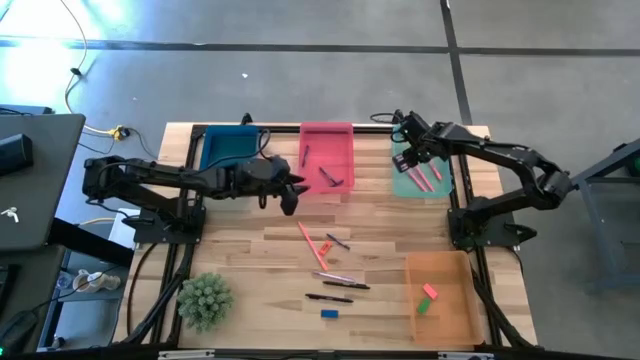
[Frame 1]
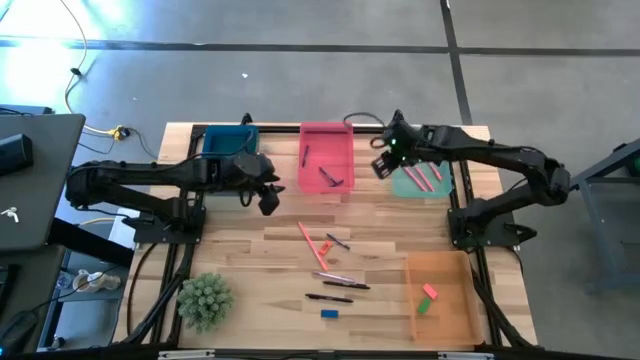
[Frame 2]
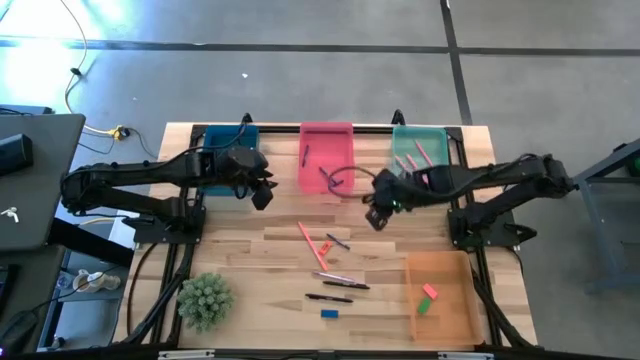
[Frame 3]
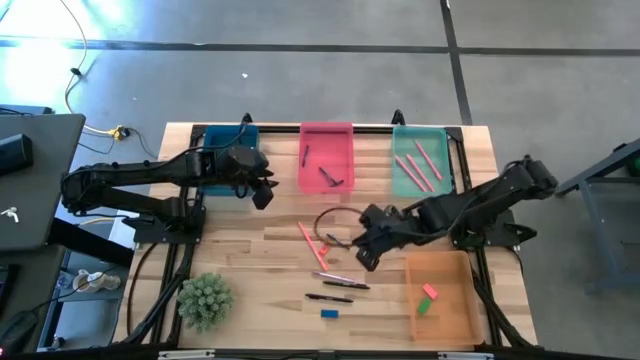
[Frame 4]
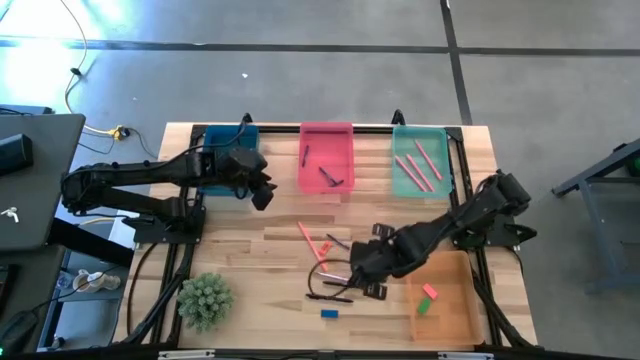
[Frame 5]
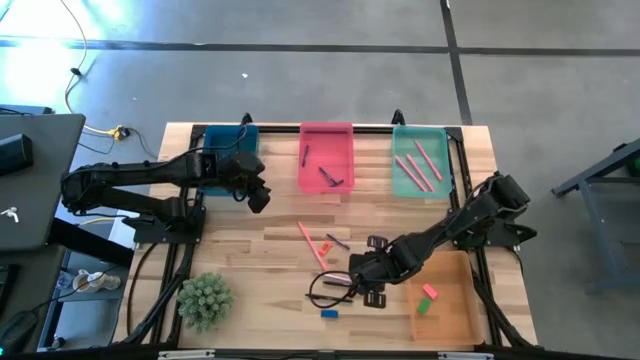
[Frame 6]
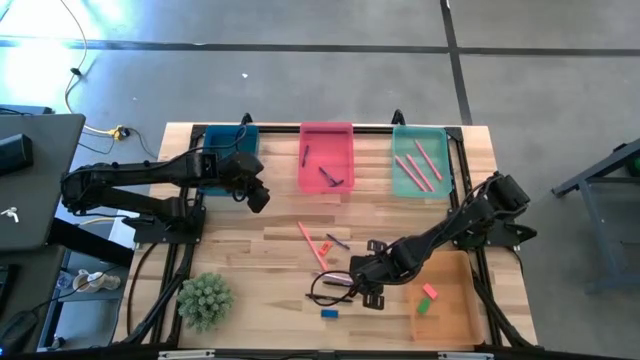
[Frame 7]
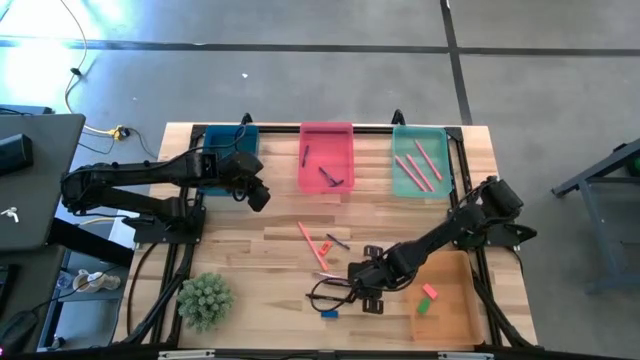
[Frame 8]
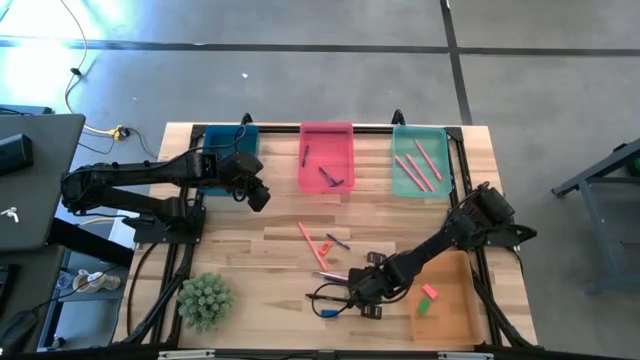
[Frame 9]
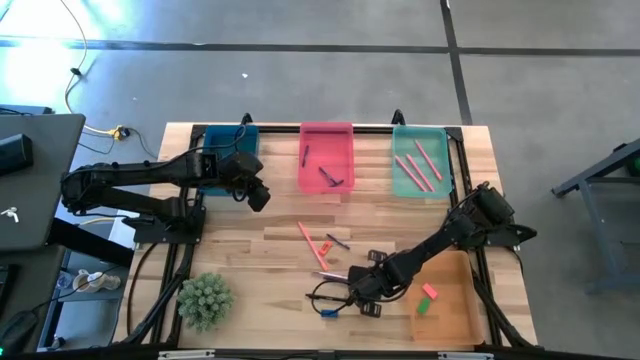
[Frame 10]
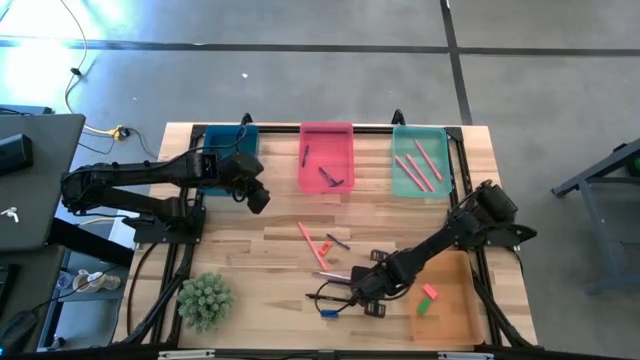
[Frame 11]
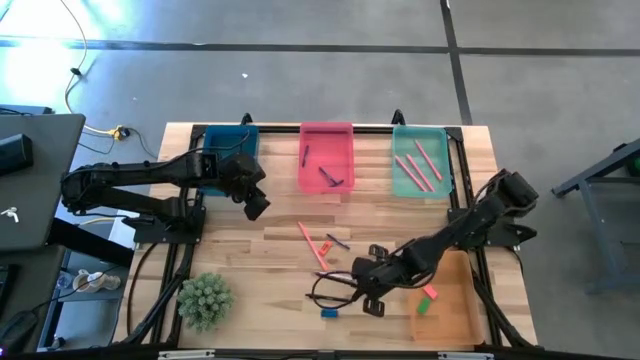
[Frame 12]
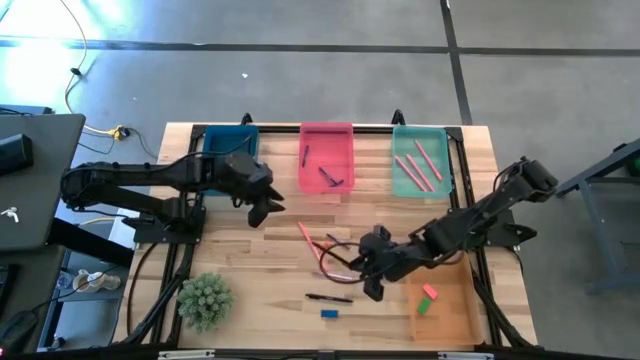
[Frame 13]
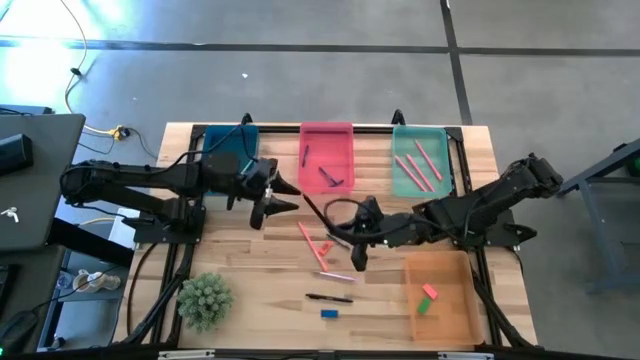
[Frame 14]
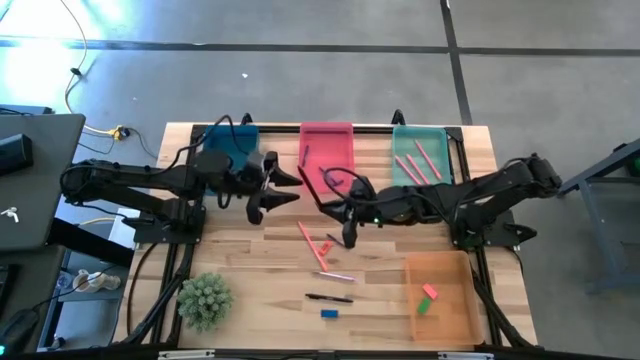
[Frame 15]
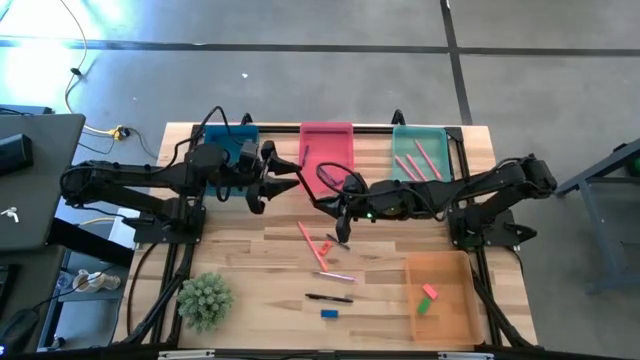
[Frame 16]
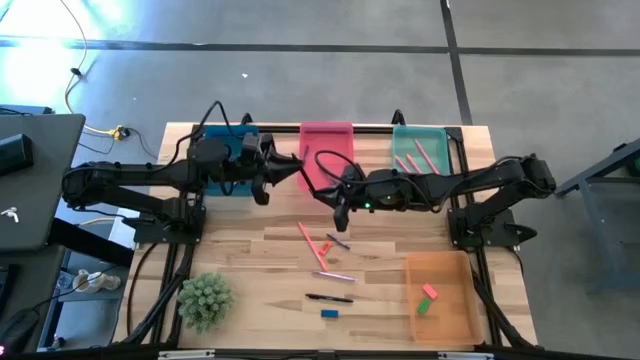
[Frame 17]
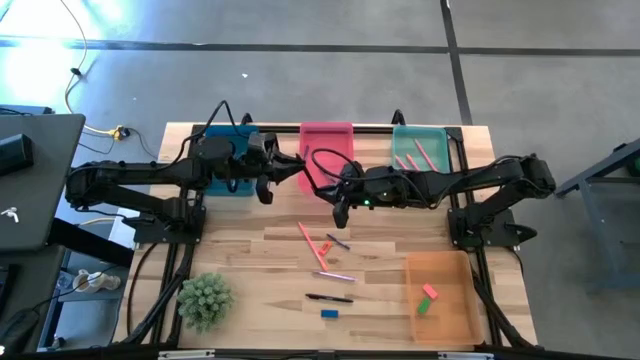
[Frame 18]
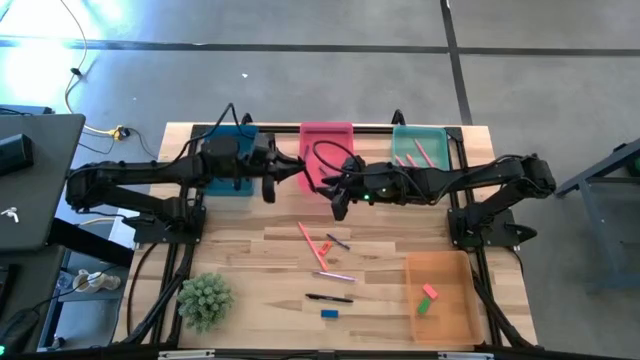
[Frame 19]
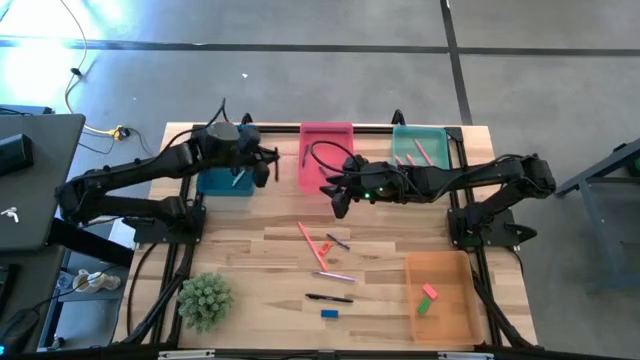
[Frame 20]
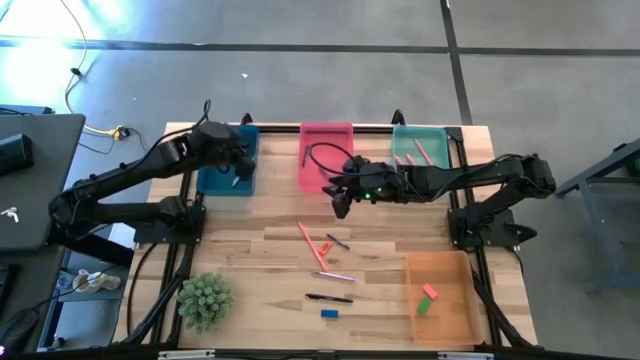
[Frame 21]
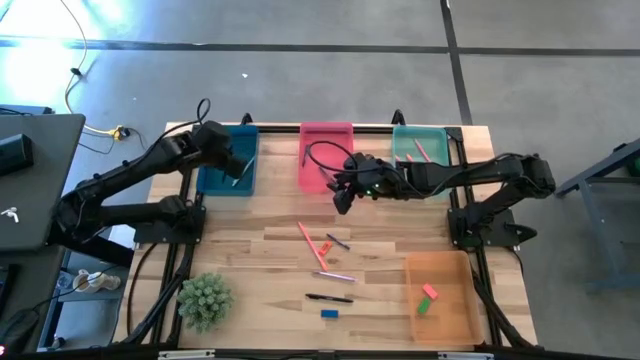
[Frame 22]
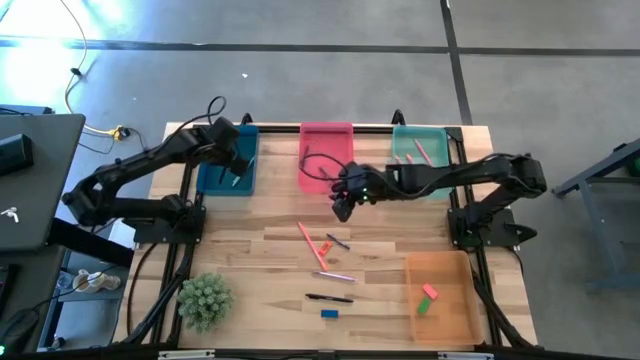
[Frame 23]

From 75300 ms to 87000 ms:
Task: Sort crayons/erasers/pens/pencils in bins
Put the black pen into the blue bin

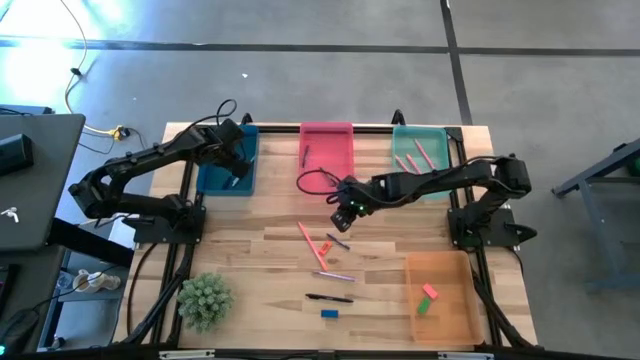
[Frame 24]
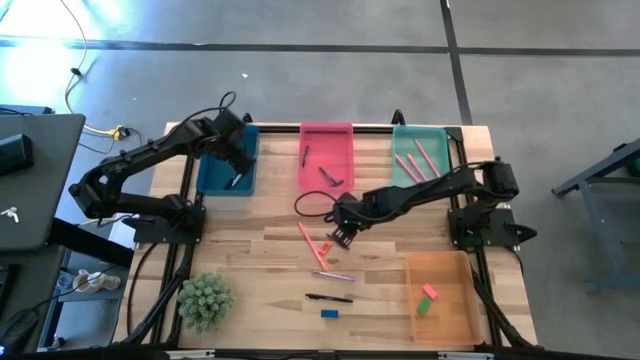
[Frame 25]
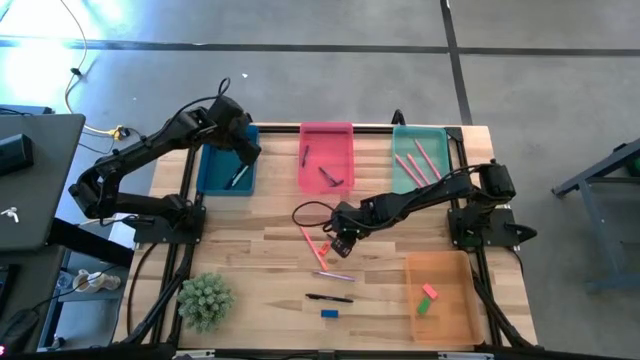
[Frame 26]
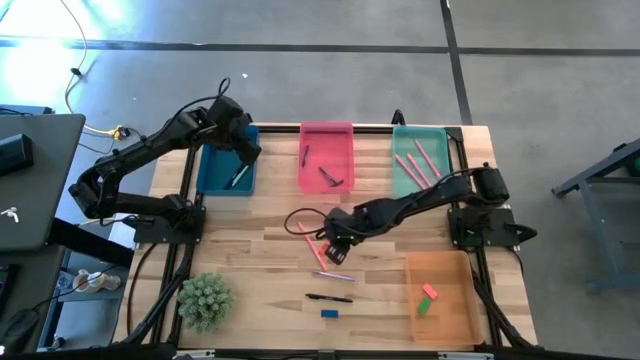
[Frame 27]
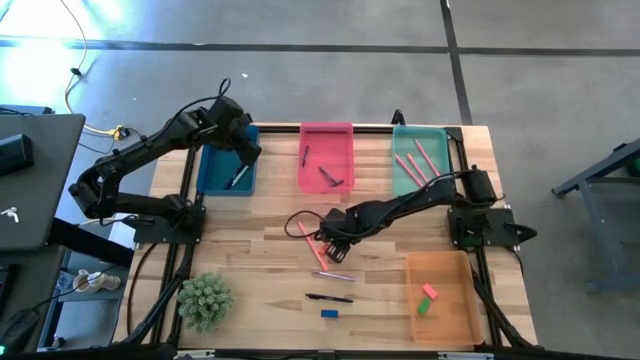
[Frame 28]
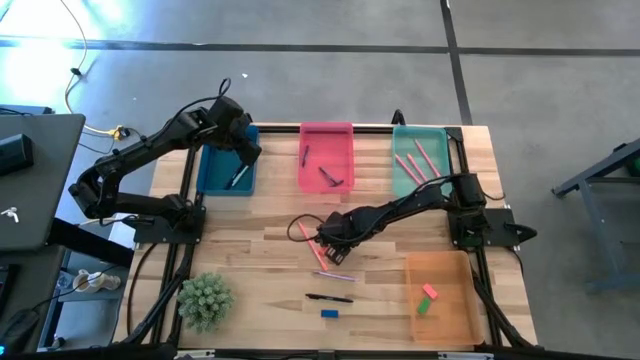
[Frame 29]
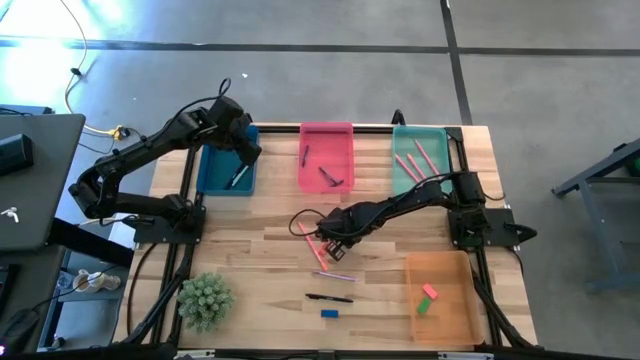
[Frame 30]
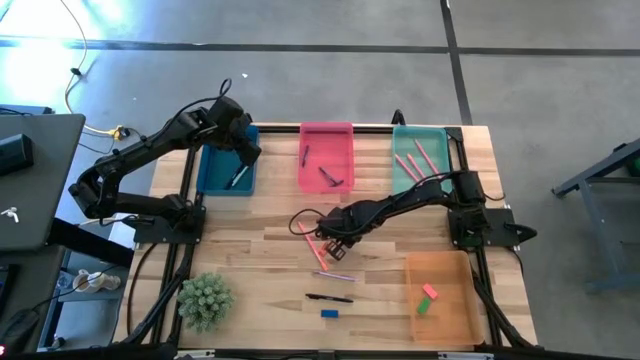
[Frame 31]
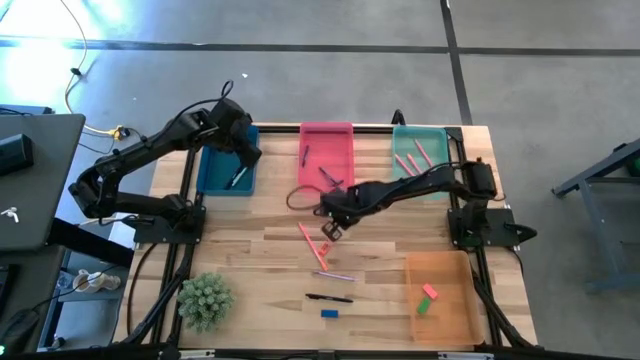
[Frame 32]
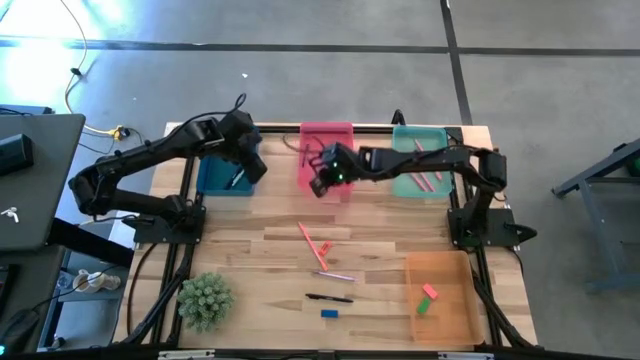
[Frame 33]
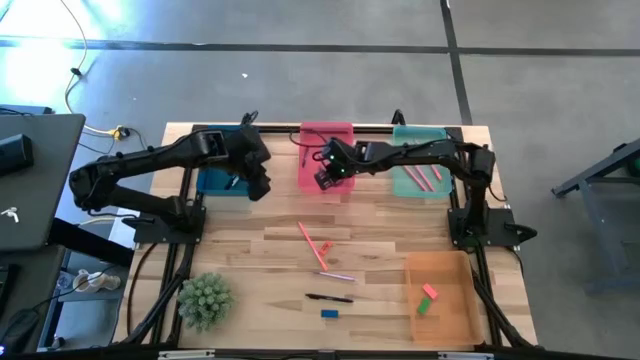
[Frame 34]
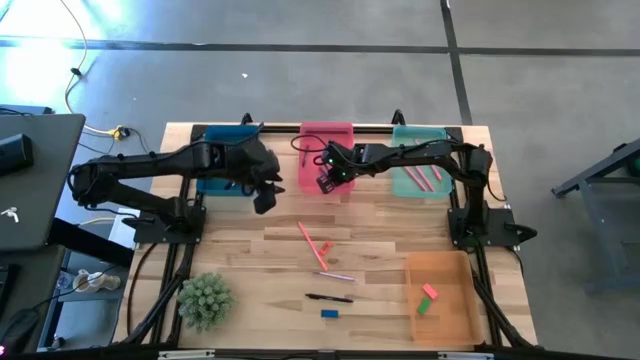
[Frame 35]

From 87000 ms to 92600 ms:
Put the blue crayon into the pink bin

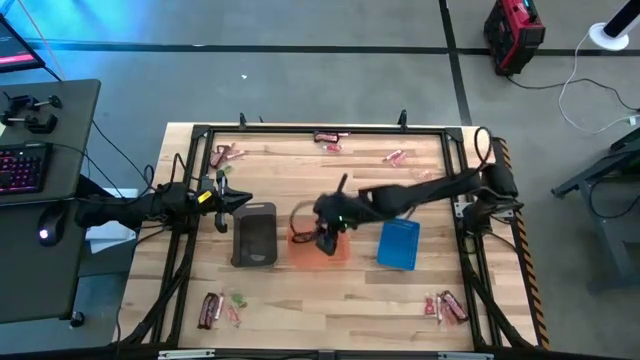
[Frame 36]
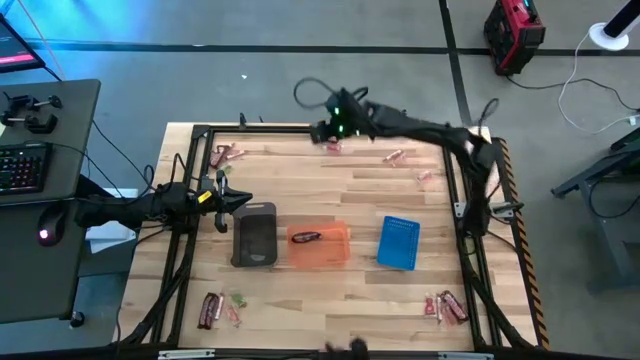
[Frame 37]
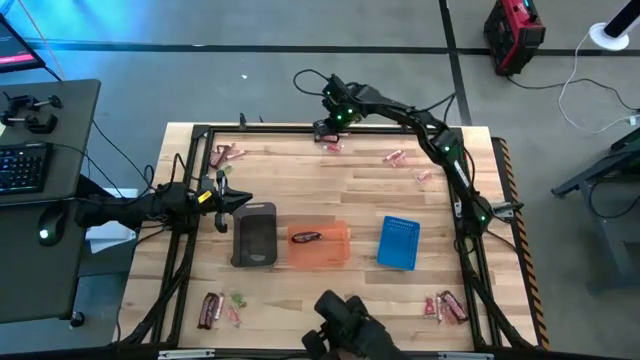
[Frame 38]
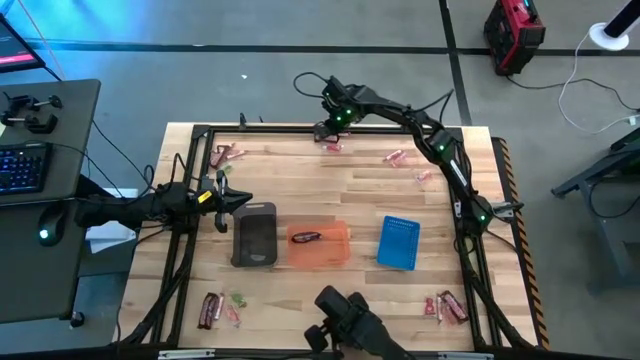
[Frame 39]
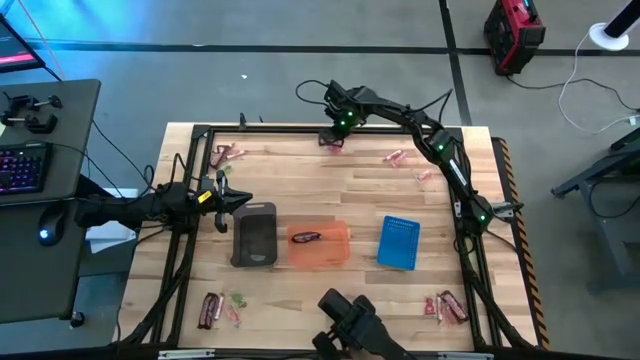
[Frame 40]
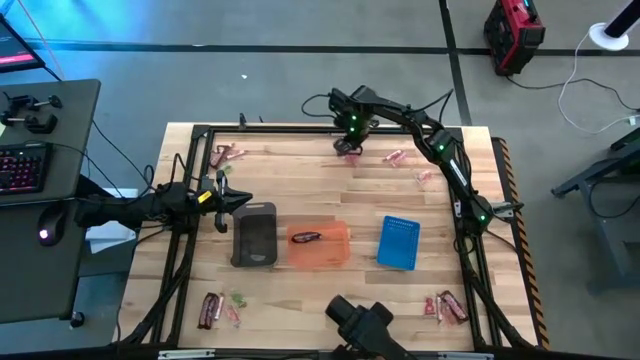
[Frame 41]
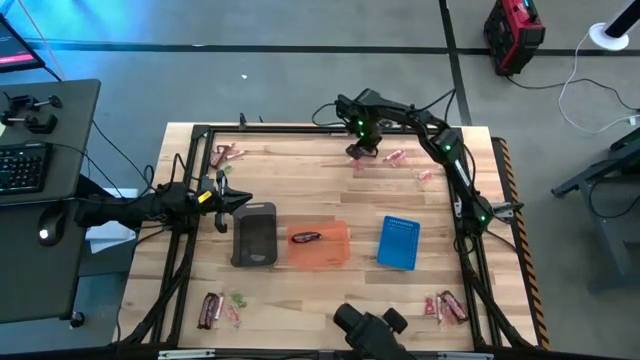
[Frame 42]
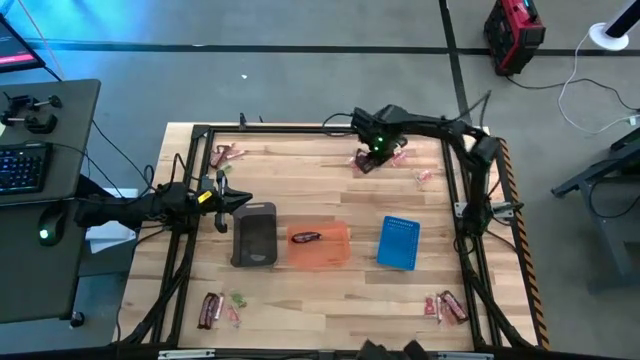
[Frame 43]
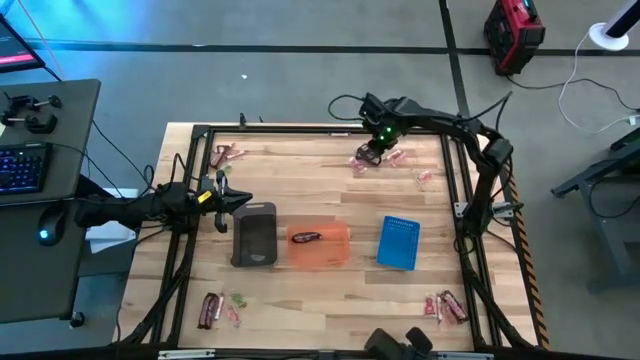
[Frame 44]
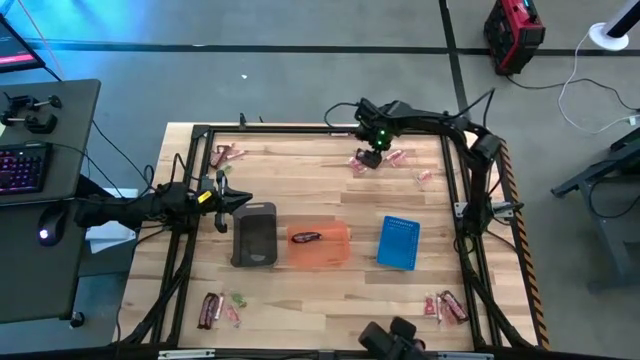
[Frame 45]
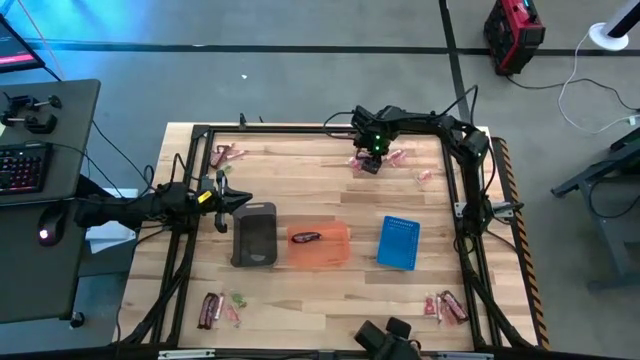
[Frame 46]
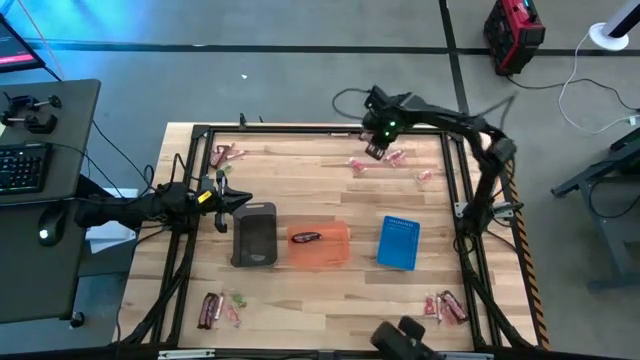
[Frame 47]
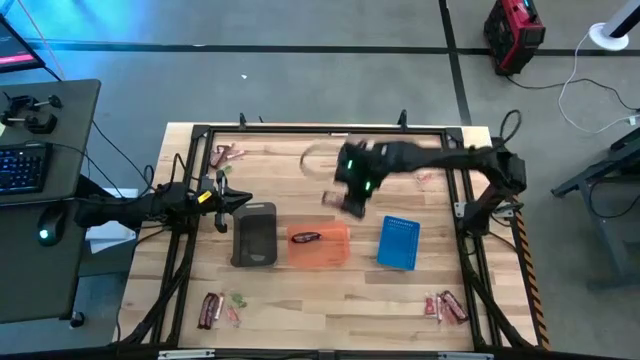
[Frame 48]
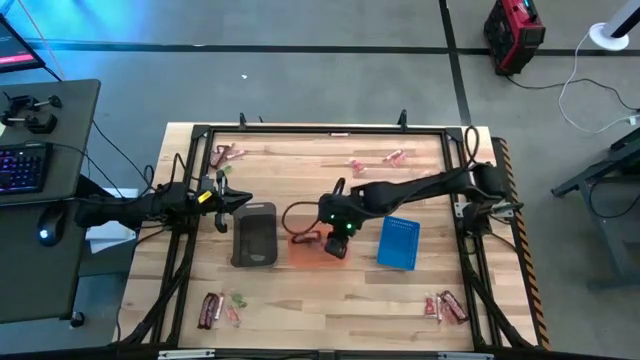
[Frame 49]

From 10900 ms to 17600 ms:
Task: Sort candy by brand, put in halloween buckets
Put the brown chocolate into the orange bin
